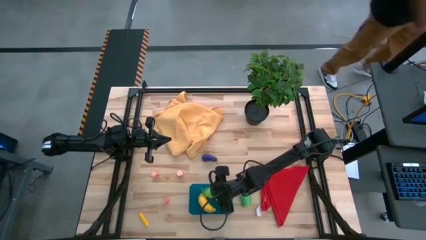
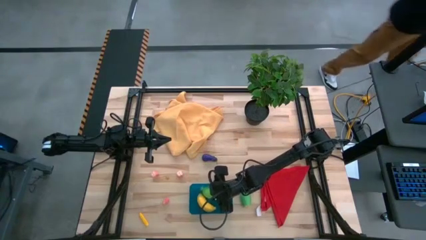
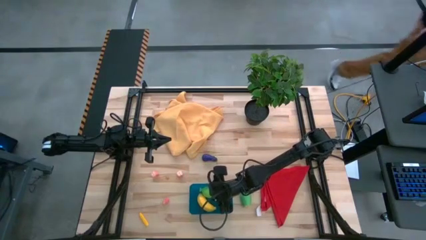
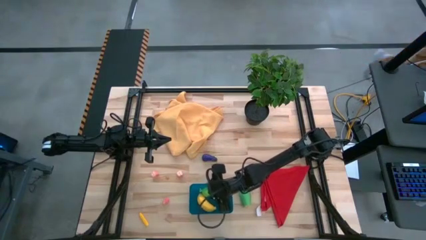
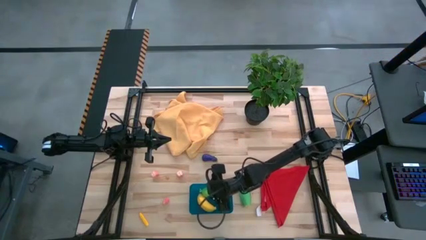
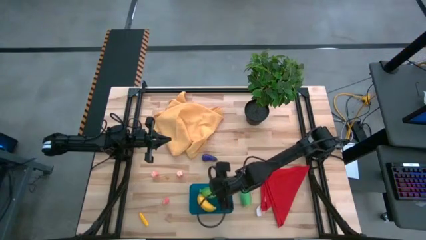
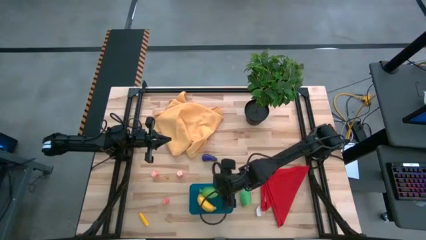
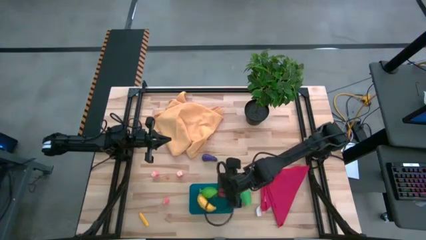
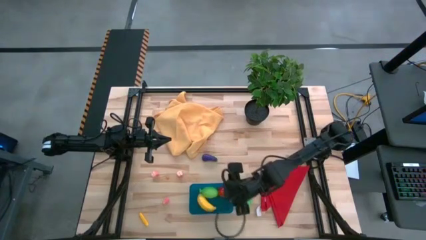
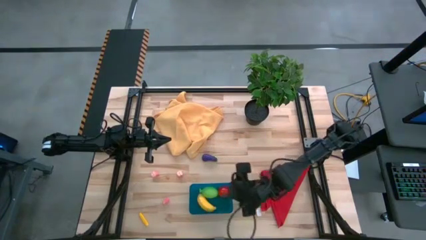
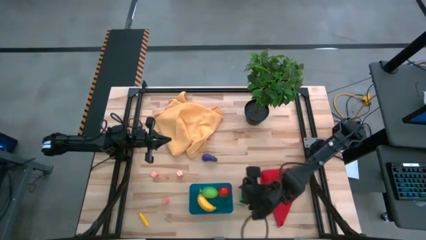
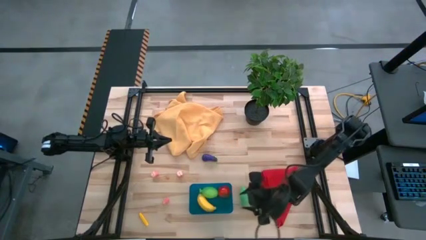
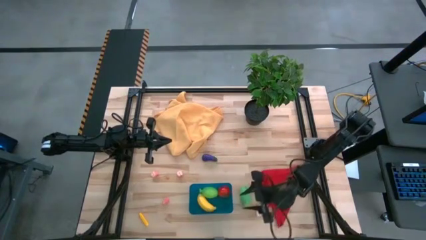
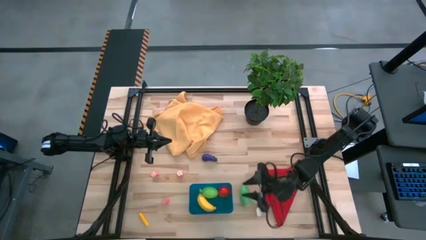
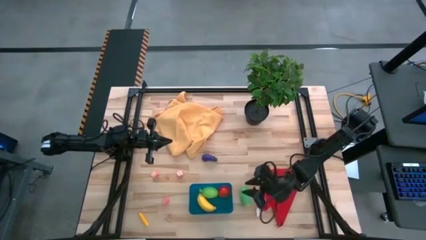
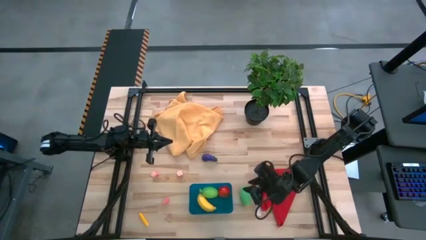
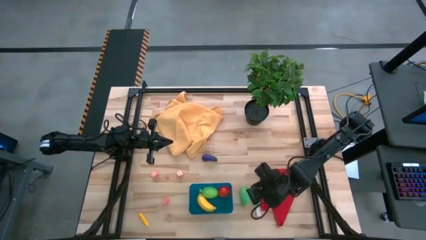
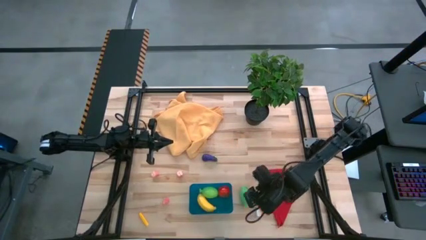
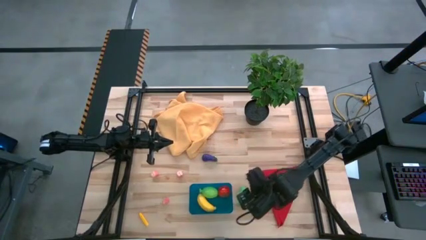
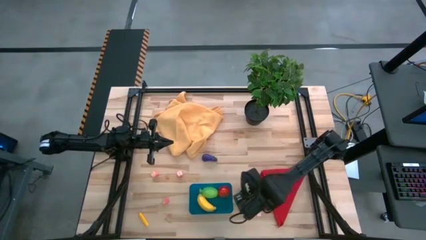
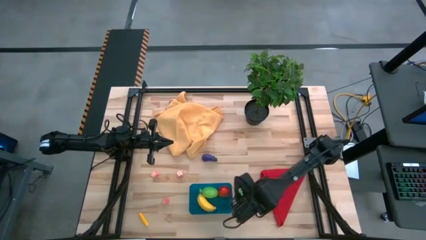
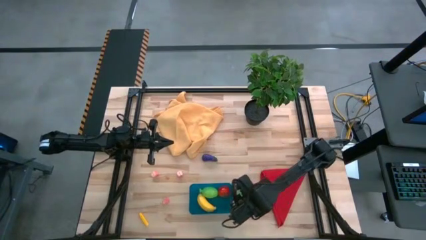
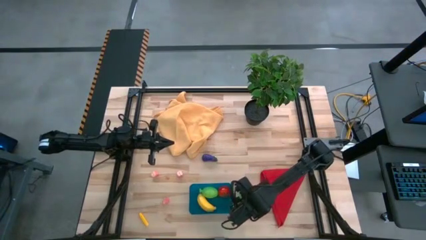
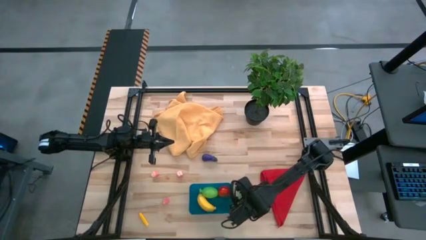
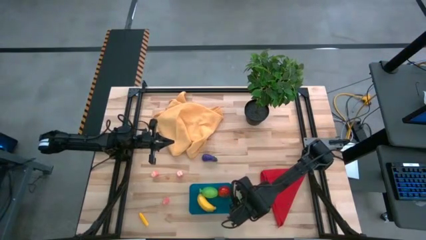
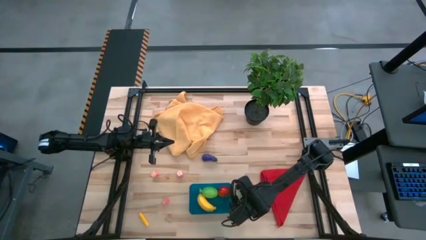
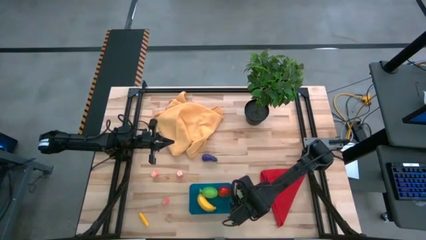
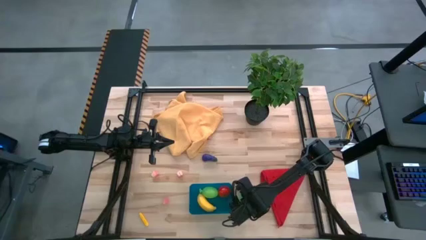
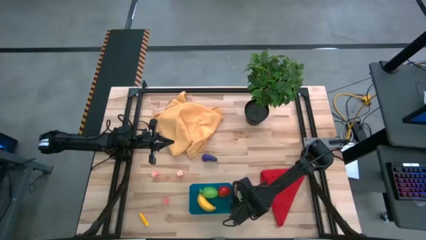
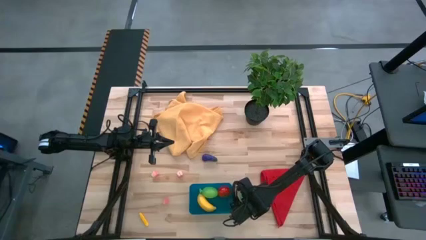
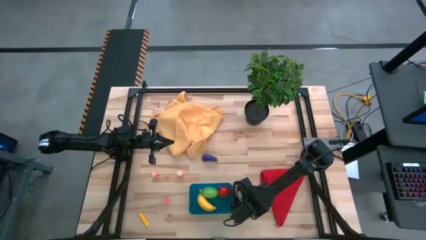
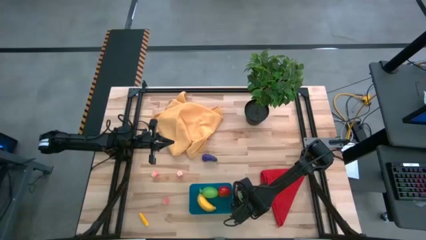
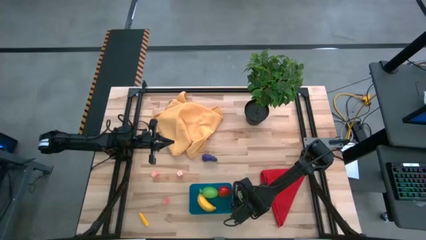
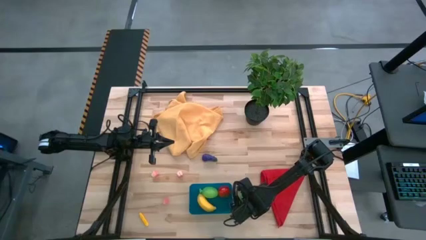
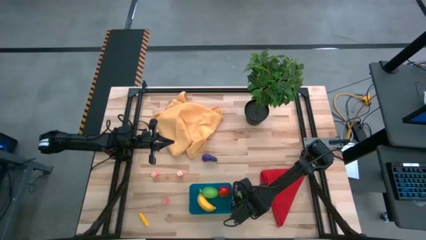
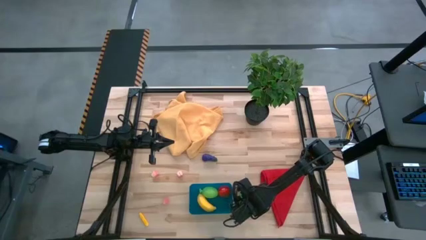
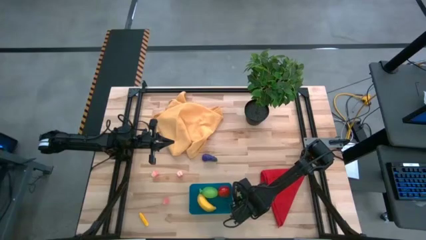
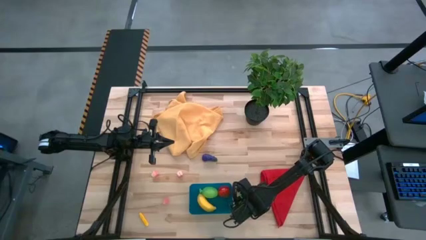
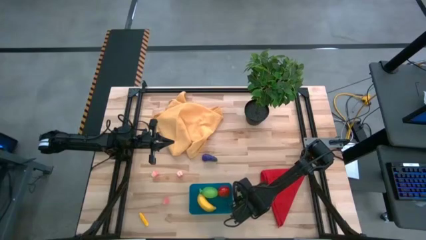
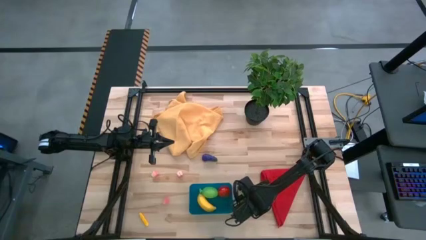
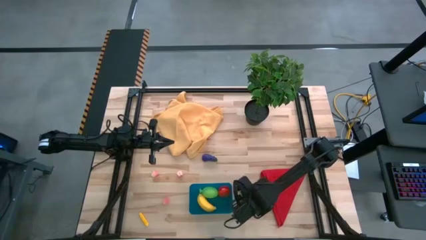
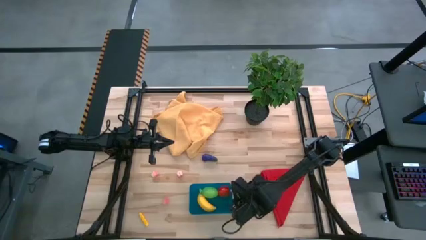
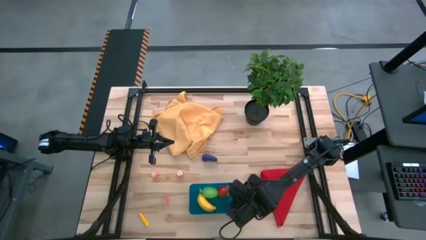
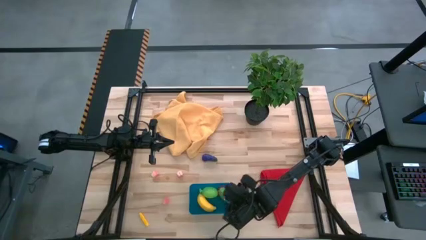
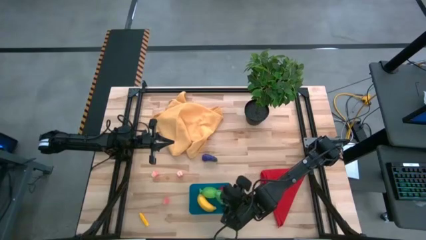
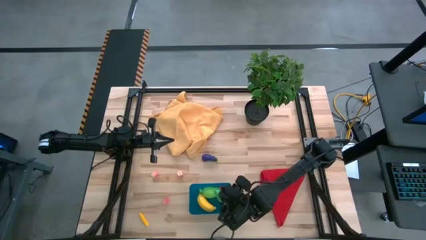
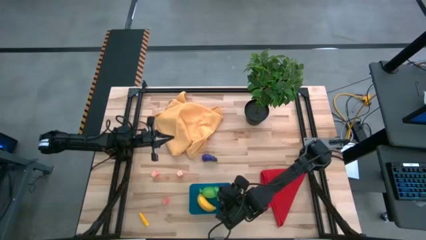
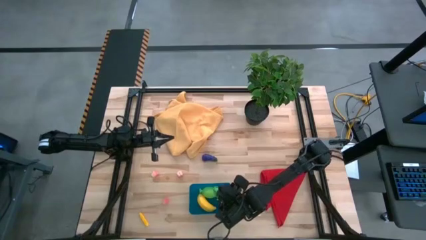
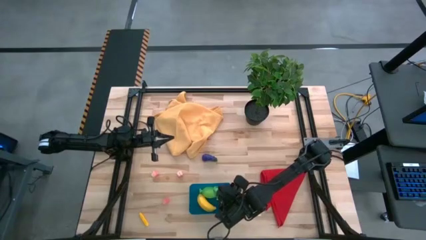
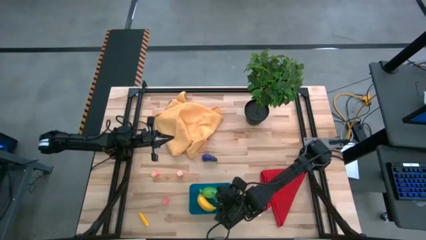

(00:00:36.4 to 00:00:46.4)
Task: Pick and placing Produce into tupperware
Put the green corn into the blue bin

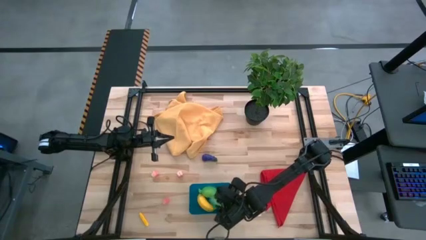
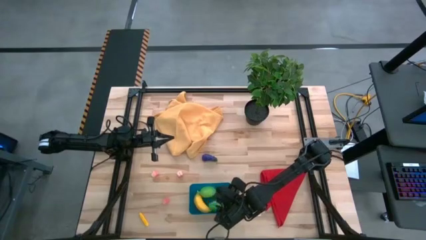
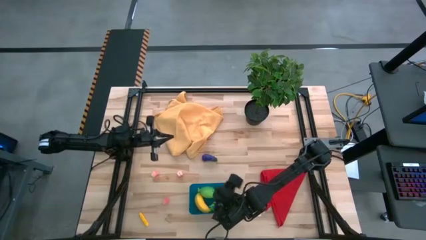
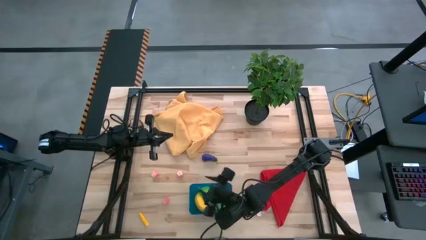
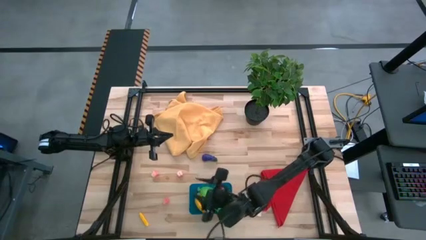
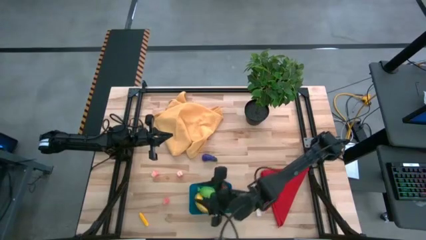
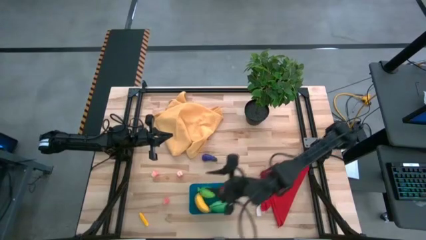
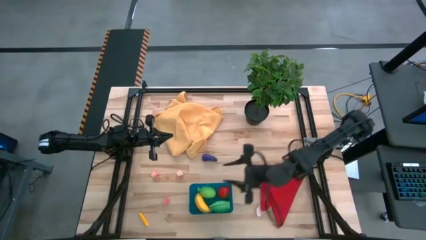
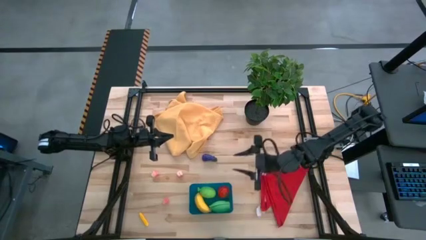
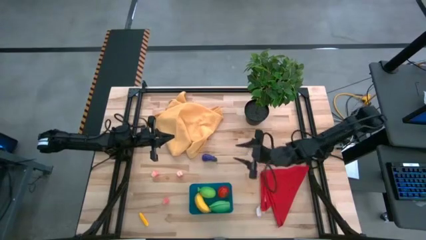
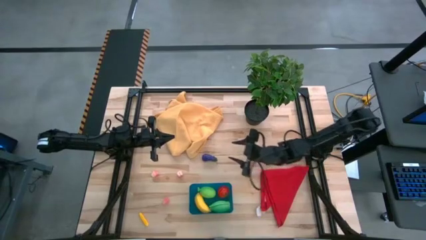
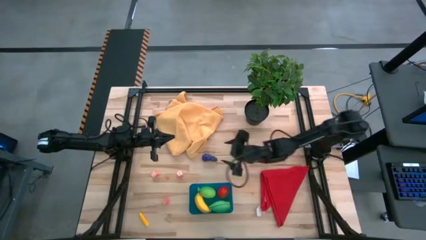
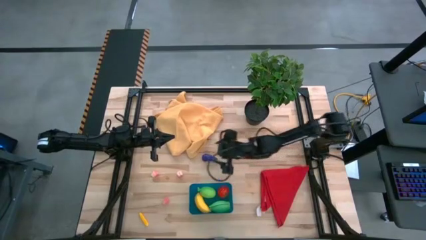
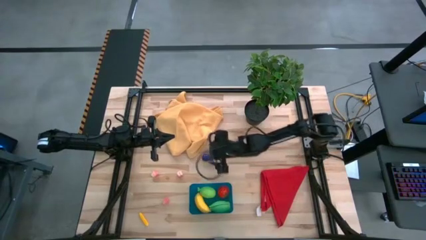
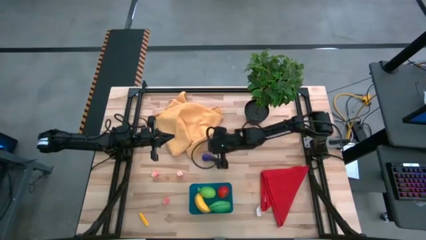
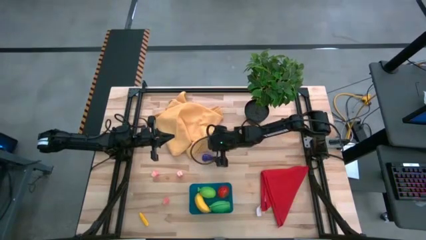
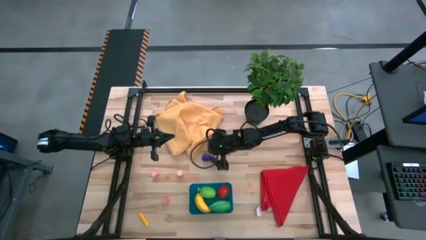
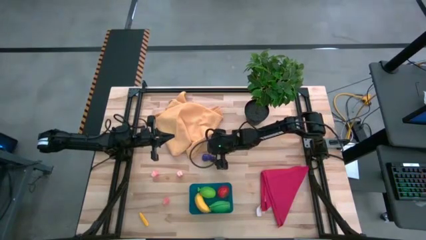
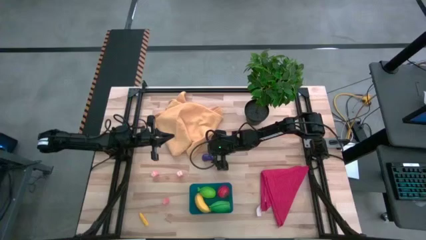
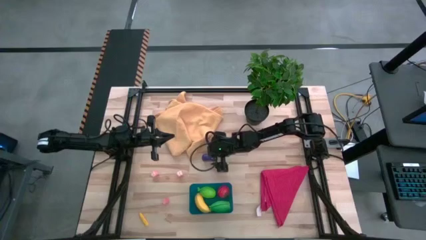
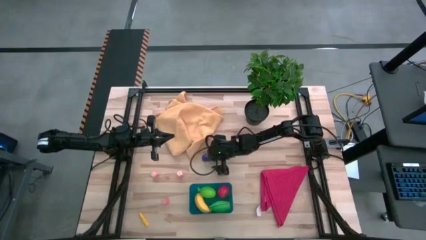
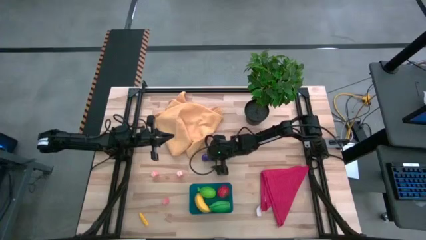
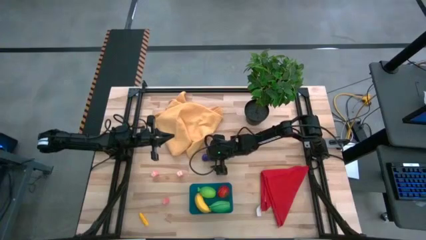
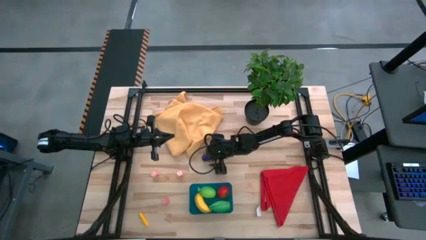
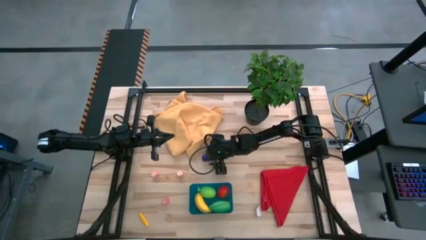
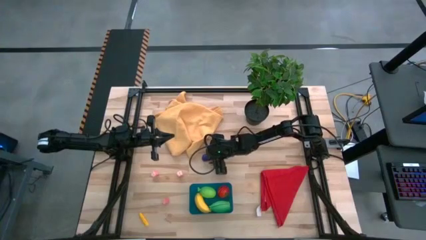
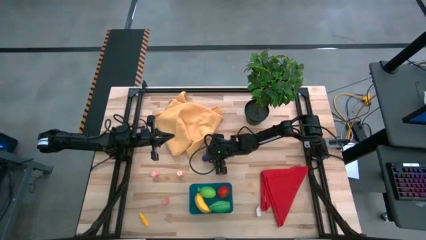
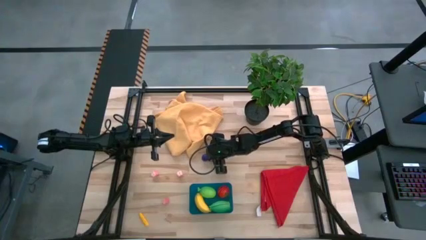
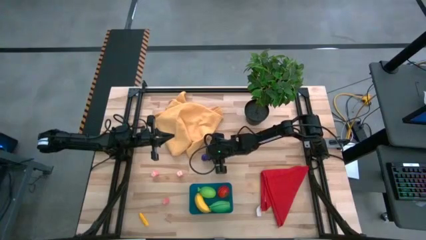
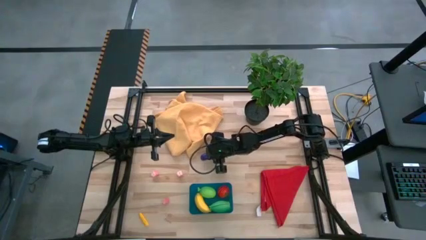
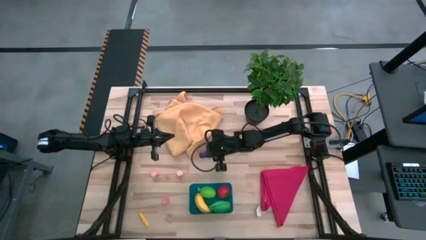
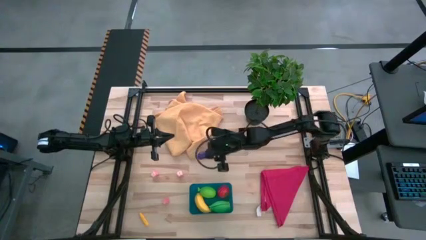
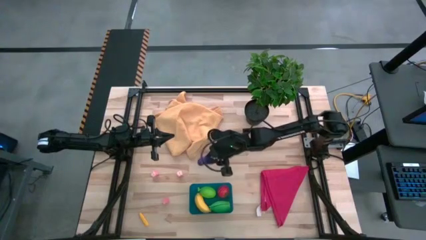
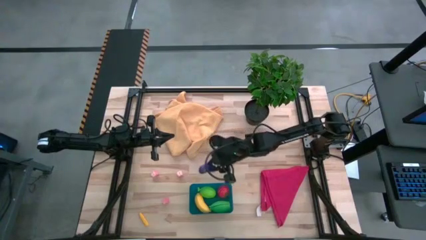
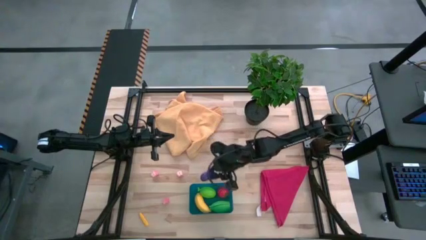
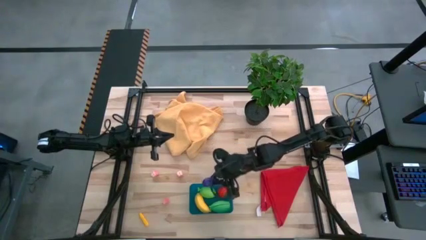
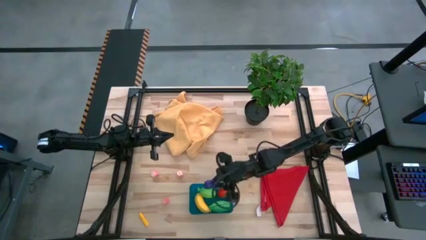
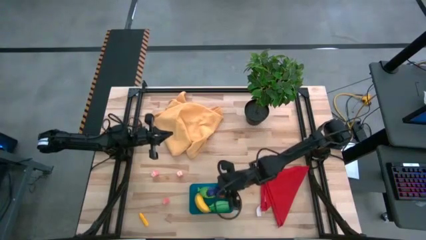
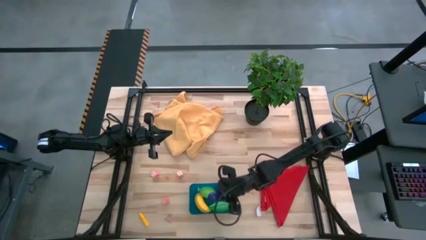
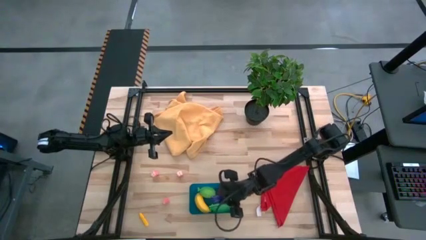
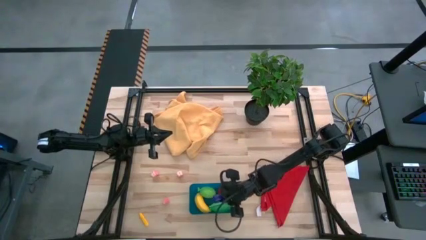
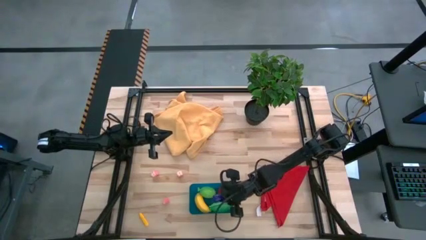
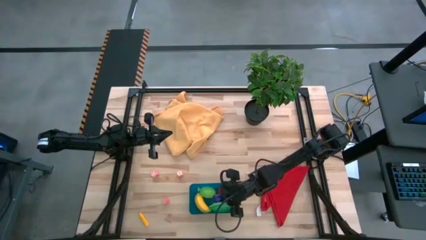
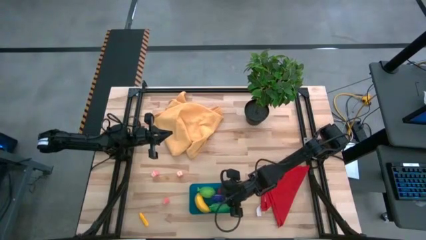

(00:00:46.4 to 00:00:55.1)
Put the purple eggplant into the blue bin
